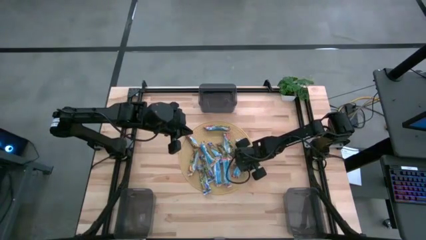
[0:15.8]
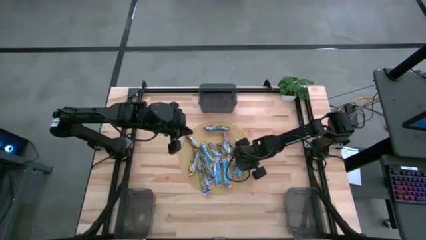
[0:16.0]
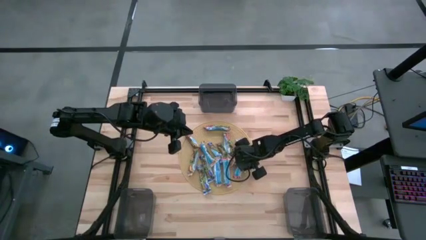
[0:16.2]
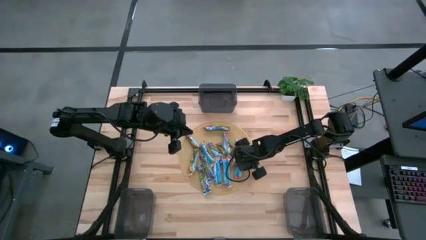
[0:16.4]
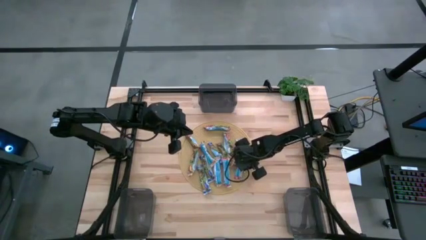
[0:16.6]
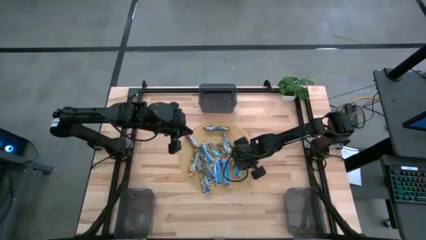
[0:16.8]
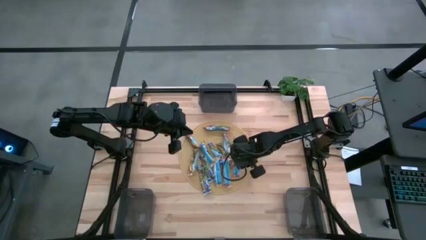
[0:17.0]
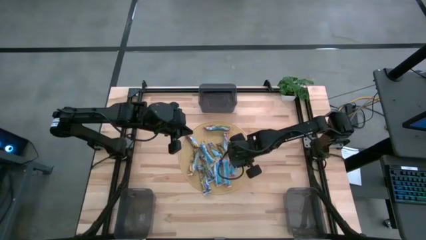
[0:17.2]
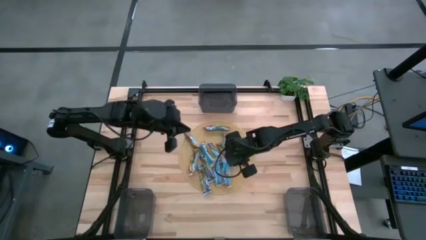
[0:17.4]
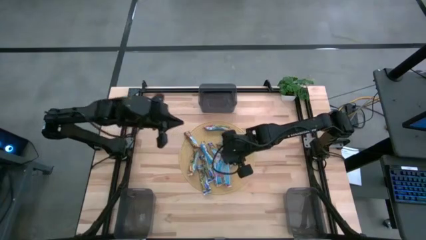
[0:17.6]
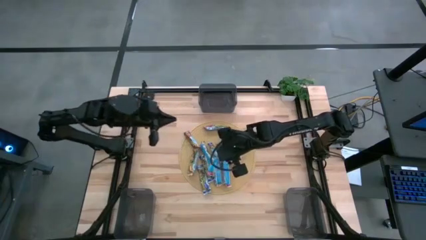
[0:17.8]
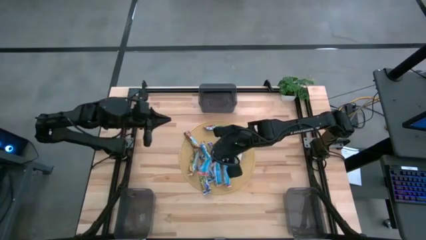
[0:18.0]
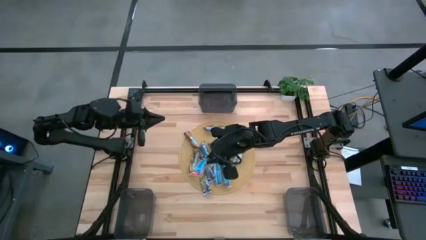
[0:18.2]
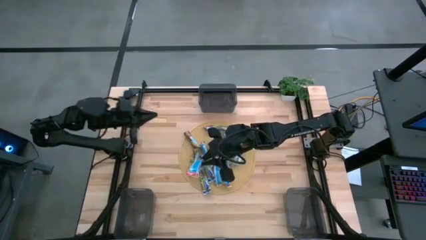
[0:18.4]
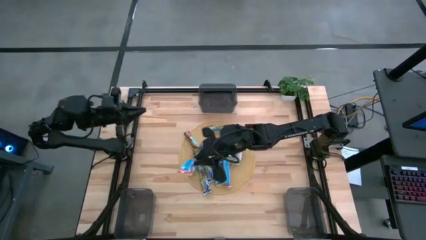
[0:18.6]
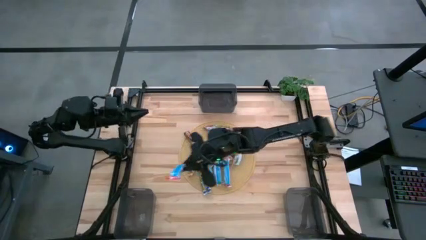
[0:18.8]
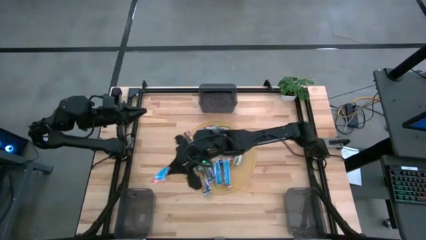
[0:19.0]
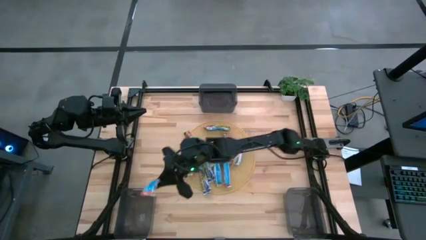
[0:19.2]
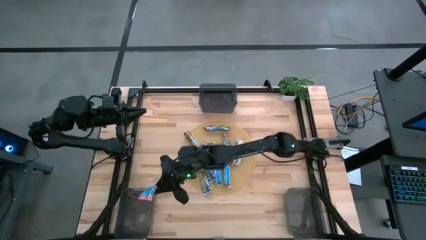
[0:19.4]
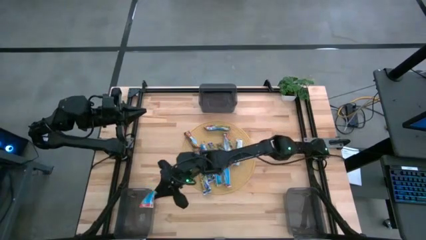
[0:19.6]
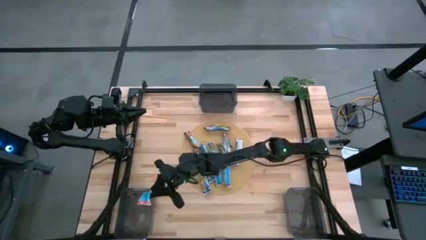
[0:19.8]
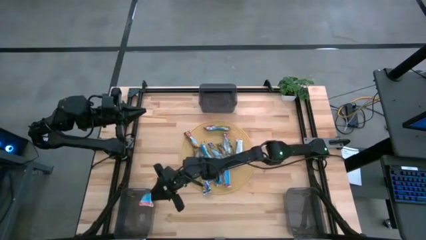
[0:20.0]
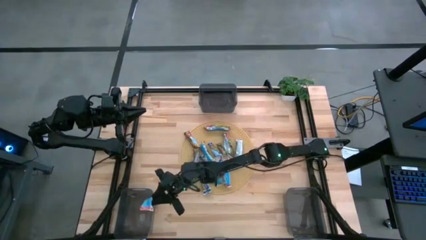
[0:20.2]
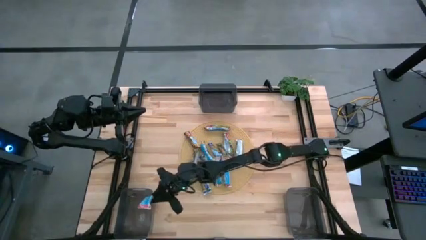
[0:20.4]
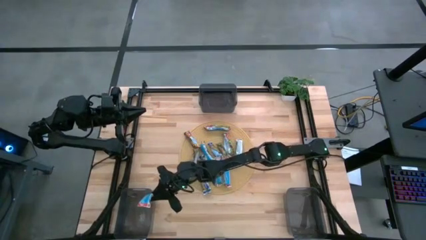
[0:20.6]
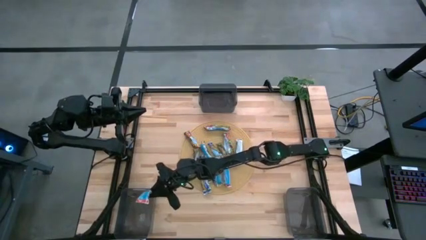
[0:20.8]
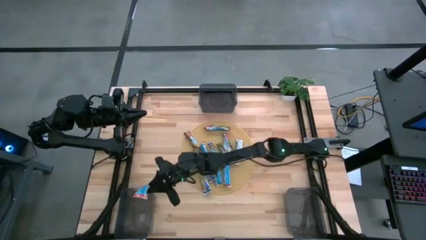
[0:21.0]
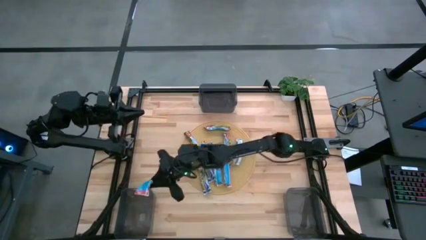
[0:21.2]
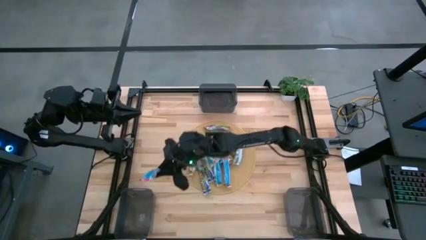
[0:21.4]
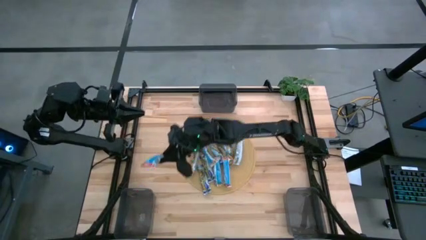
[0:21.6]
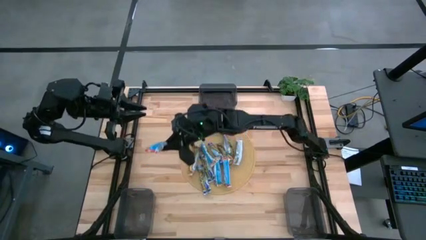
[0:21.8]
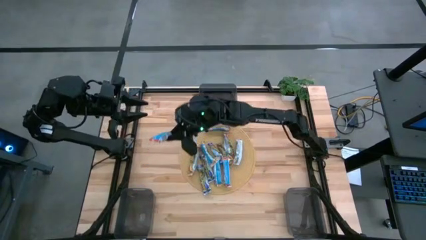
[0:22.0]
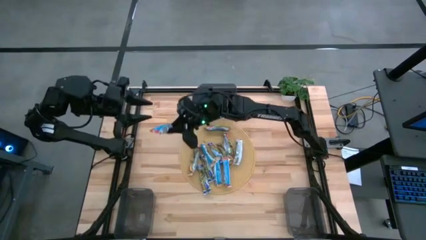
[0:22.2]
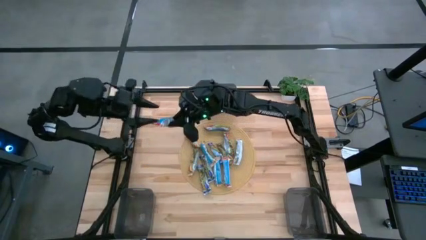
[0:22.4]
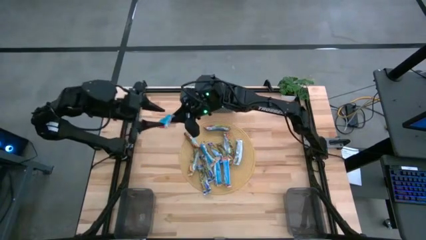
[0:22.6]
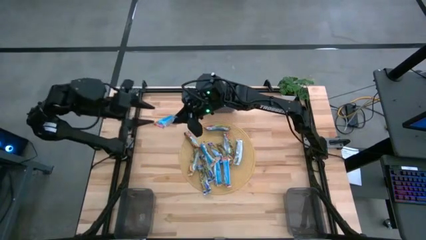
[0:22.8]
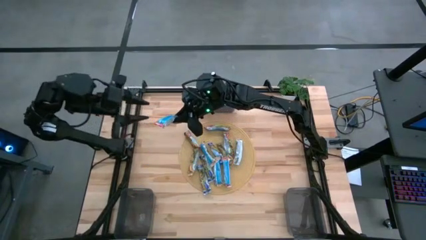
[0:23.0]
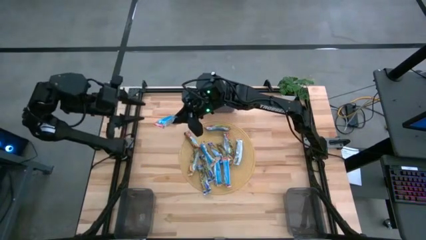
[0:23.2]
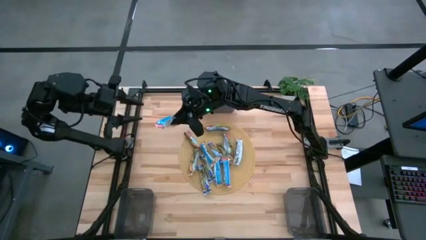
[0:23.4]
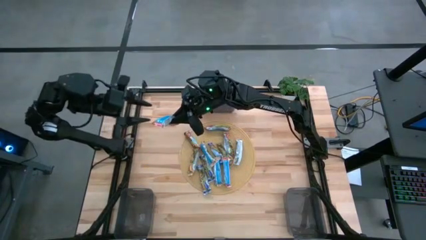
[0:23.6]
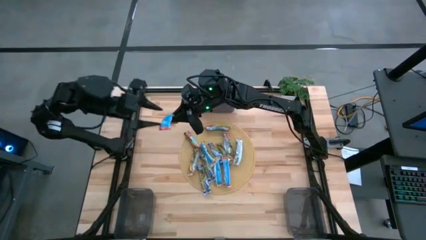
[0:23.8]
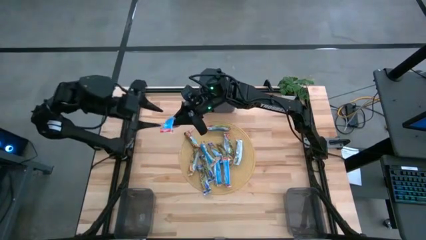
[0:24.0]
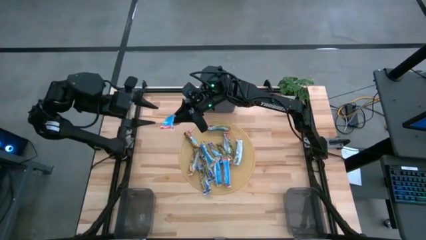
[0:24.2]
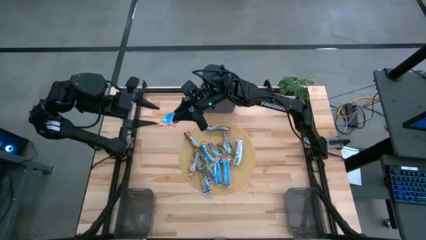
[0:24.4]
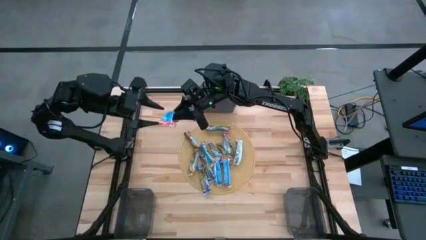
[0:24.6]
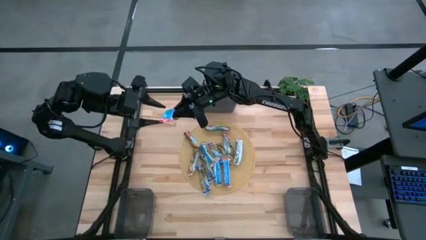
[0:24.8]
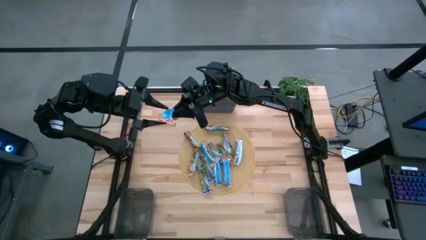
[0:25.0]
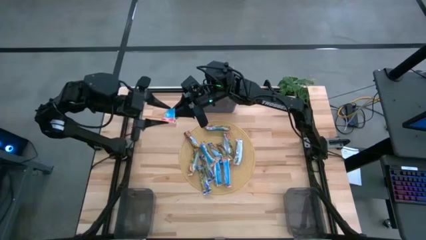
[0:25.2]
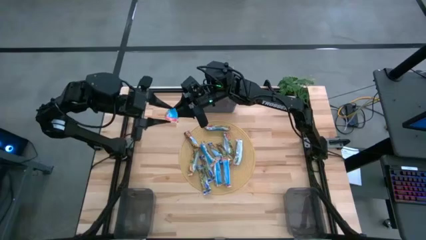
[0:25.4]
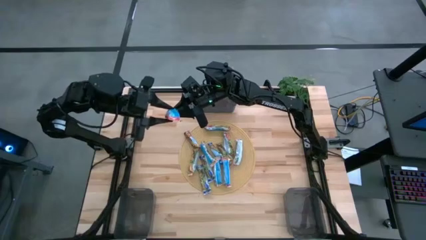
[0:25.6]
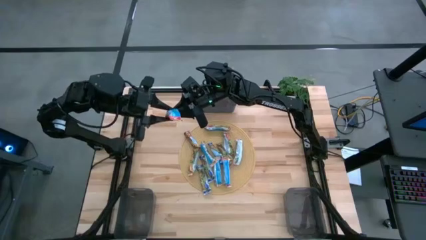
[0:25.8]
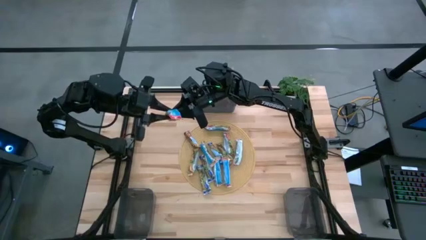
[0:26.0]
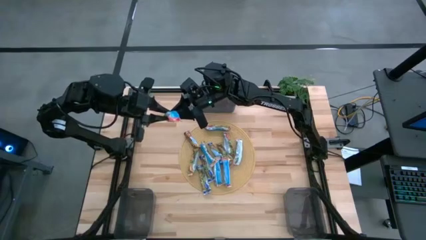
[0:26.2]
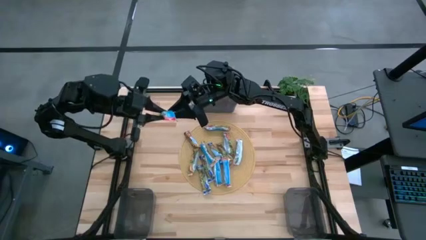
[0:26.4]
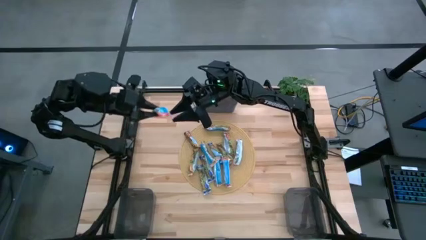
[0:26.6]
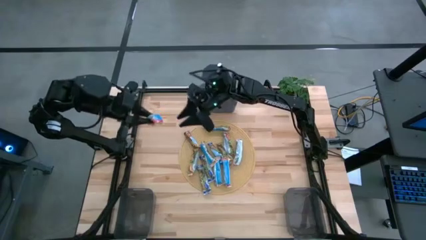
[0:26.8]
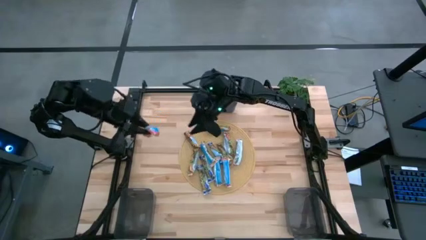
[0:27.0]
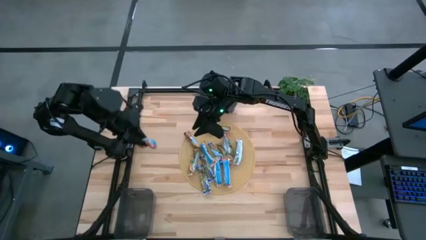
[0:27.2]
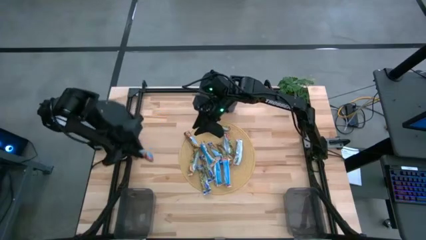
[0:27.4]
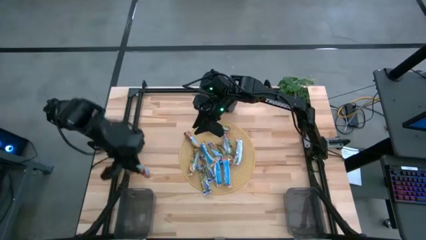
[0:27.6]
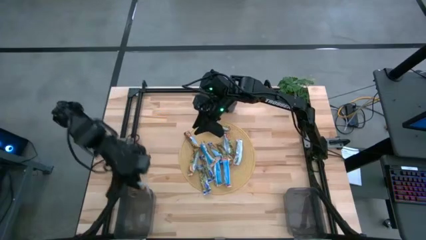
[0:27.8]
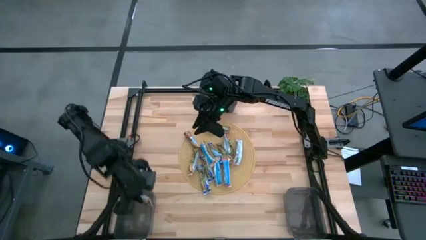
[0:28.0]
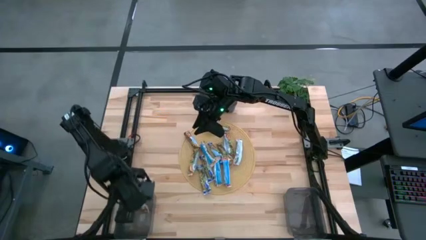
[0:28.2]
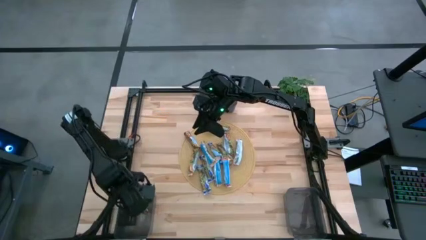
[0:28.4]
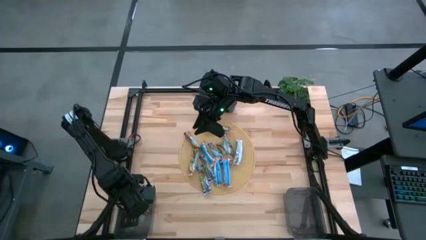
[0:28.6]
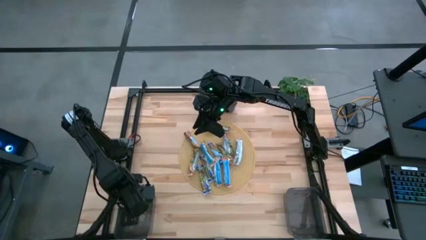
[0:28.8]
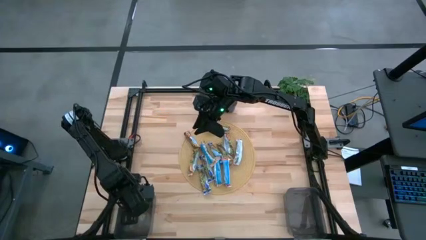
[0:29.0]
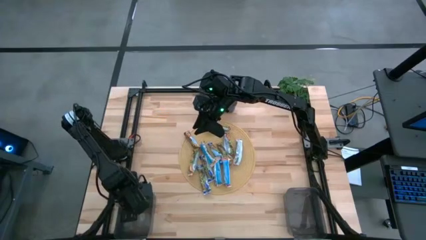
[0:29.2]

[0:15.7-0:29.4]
Task: Pick and place Granola Bars by type
Put the red granola bar into the left black bin
